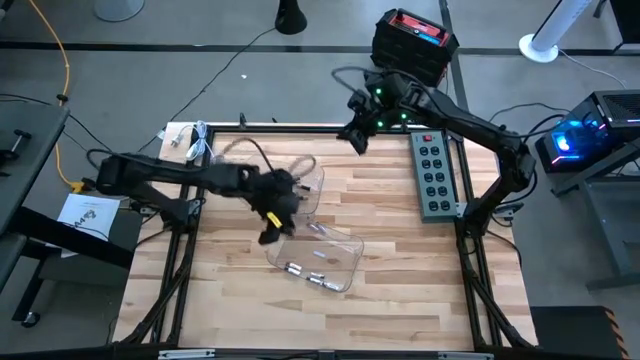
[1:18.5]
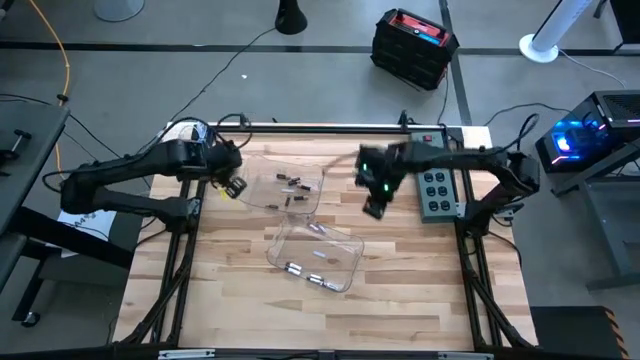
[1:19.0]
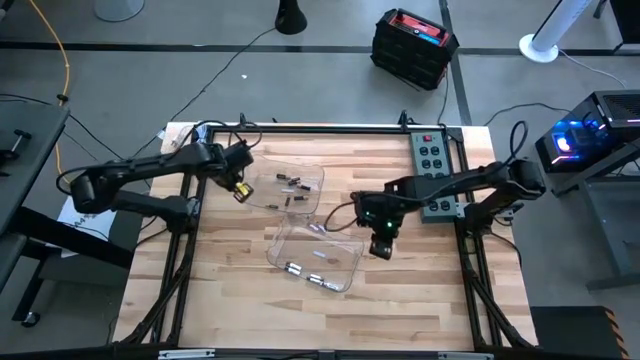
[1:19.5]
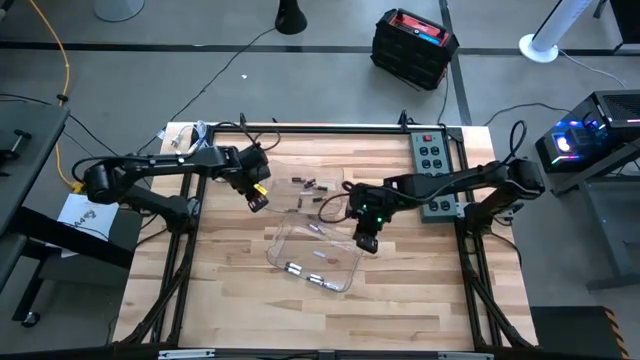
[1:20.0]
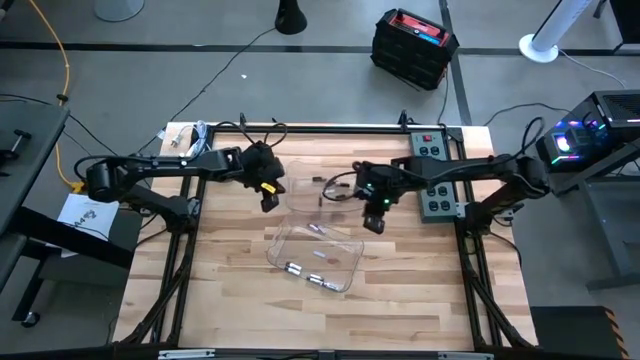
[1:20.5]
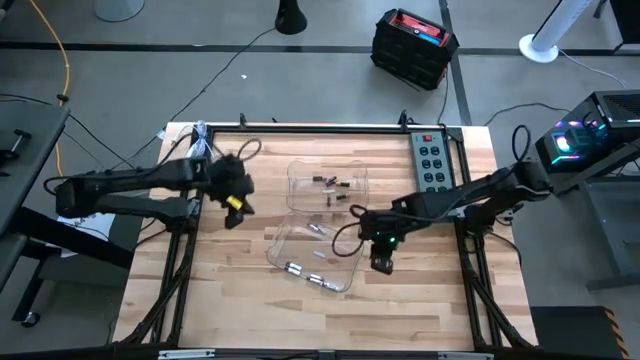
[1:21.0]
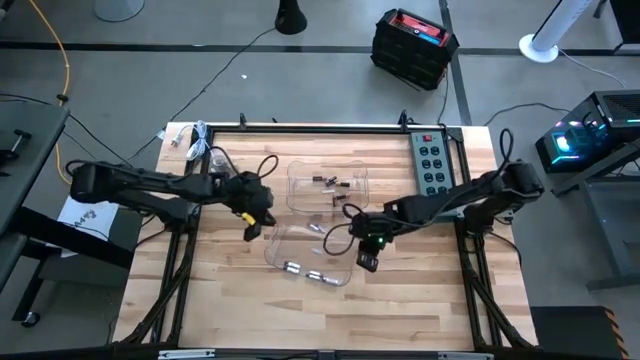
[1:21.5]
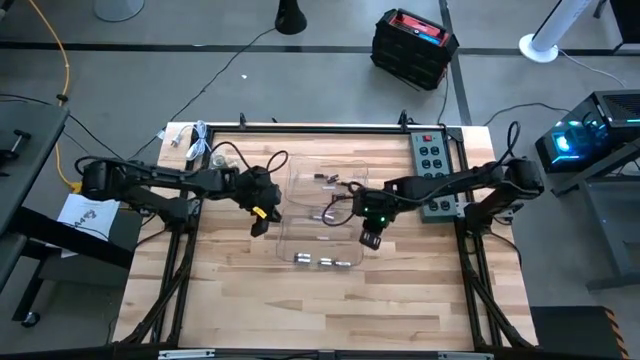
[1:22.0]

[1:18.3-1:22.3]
Task: Sort batteries
Adjust the transparent bins

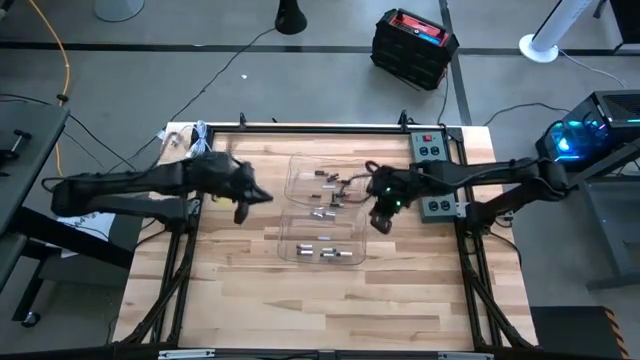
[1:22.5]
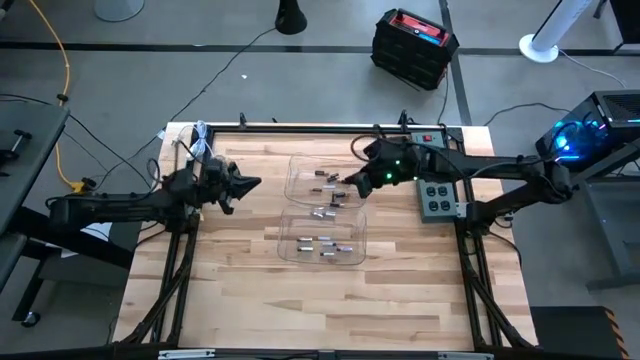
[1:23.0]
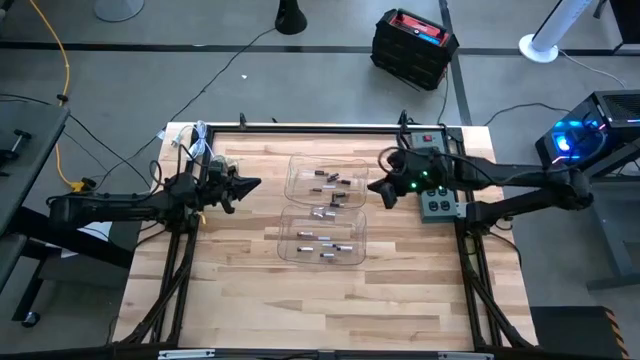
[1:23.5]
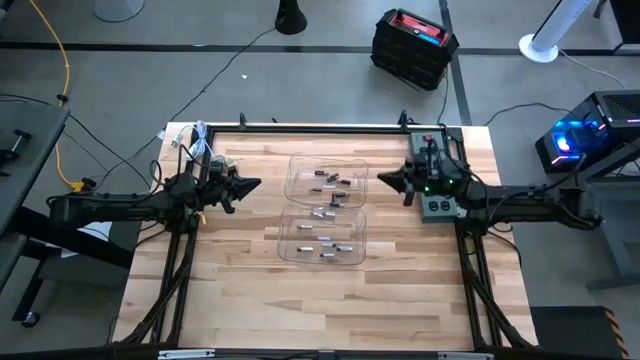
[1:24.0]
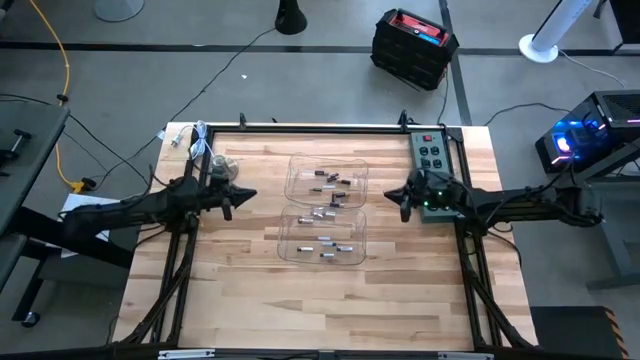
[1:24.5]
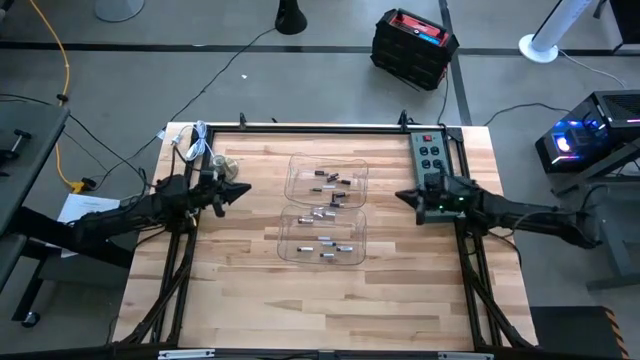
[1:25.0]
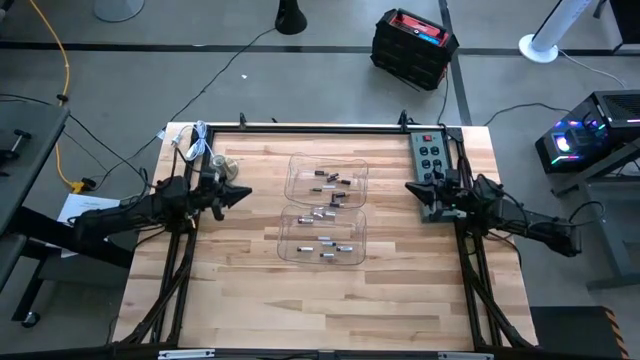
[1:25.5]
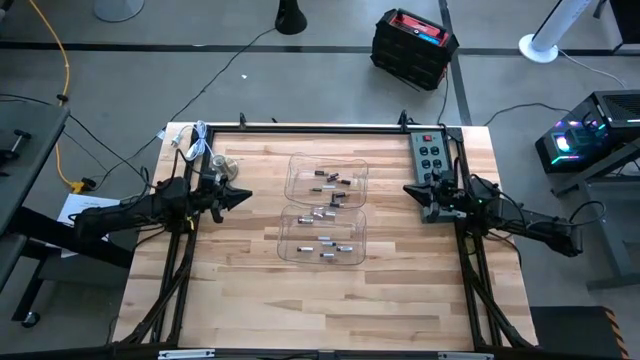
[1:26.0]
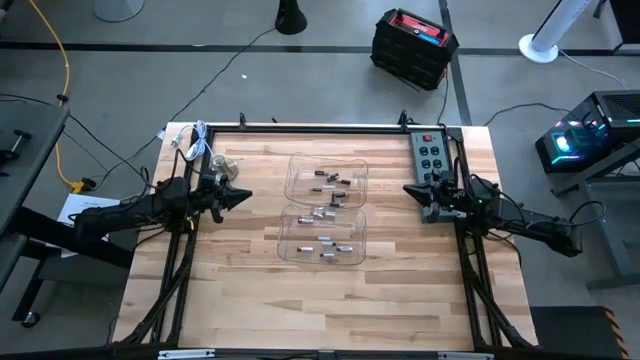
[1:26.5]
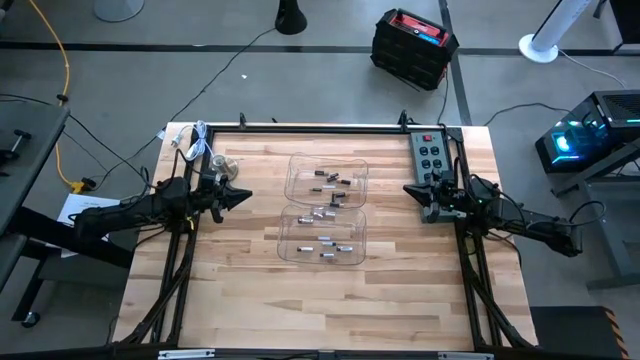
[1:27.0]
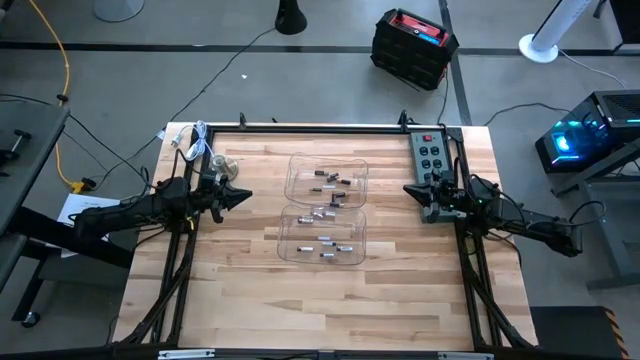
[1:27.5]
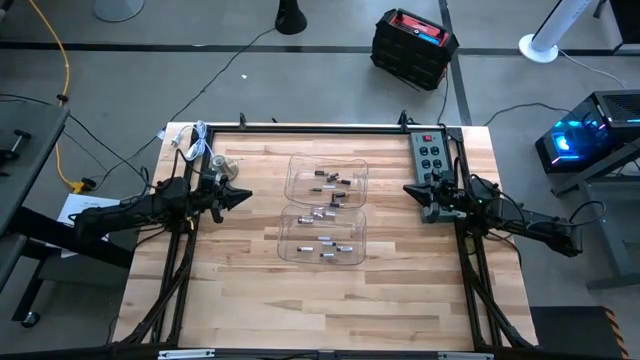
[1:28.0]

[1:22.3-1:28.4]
Return to home position
